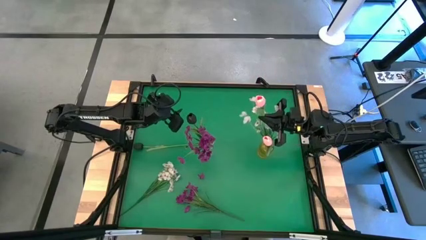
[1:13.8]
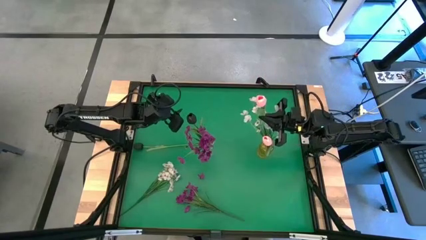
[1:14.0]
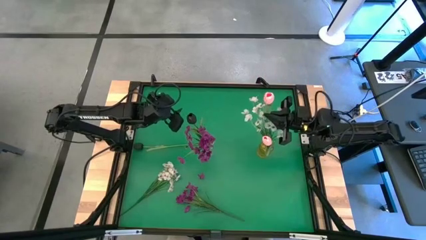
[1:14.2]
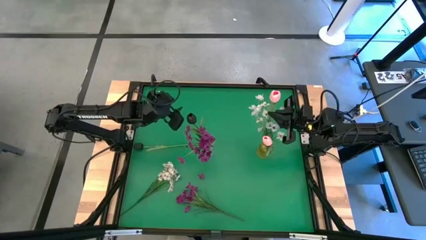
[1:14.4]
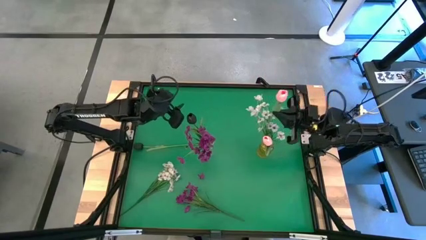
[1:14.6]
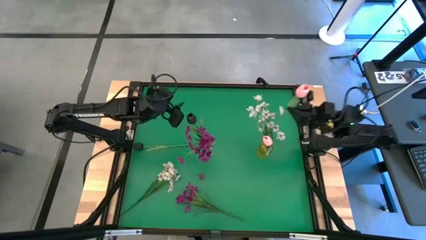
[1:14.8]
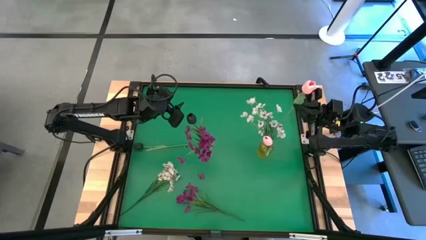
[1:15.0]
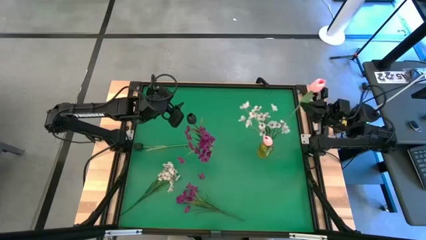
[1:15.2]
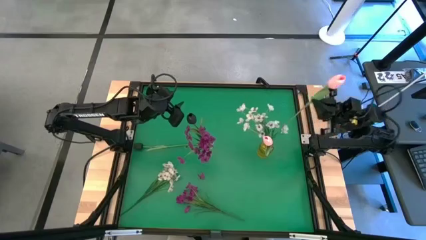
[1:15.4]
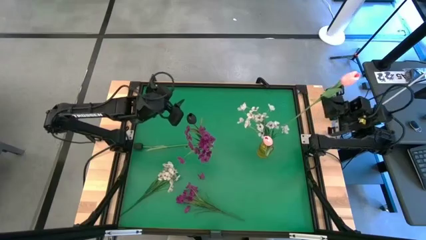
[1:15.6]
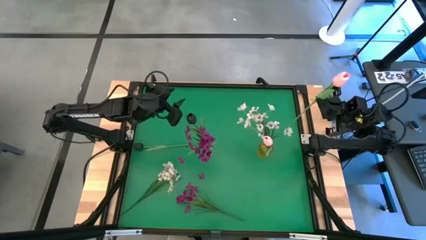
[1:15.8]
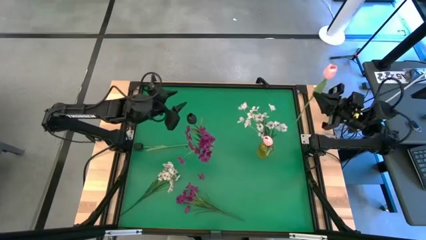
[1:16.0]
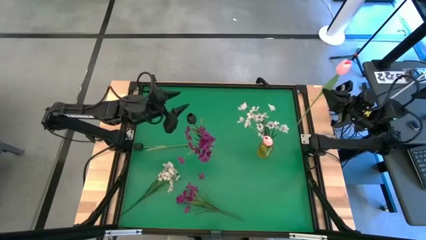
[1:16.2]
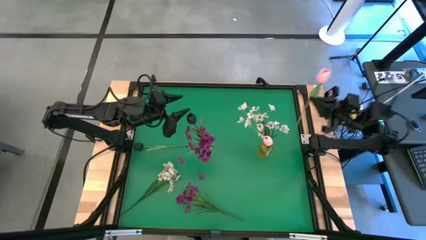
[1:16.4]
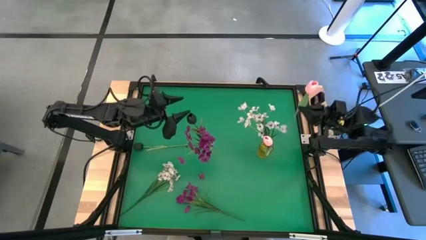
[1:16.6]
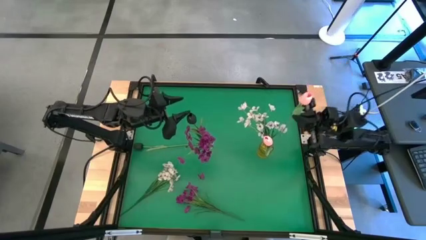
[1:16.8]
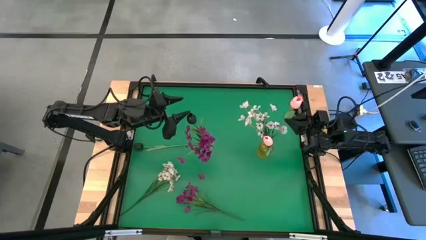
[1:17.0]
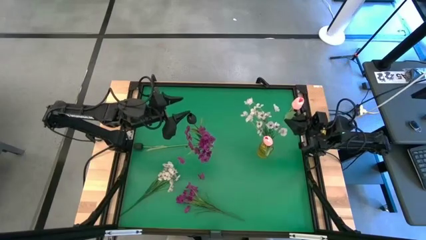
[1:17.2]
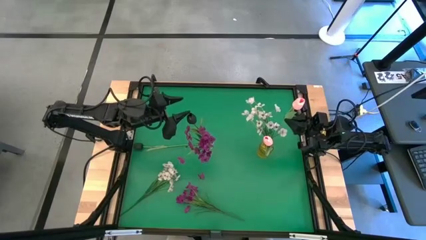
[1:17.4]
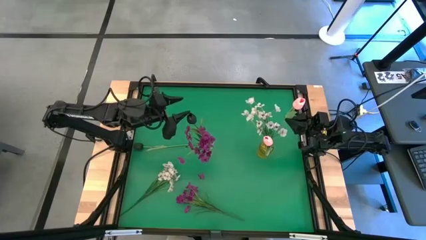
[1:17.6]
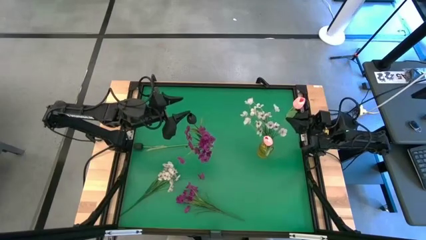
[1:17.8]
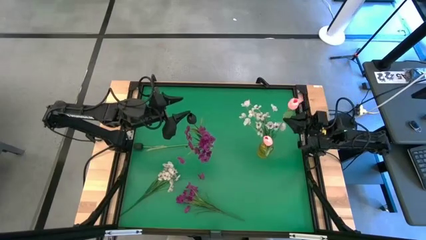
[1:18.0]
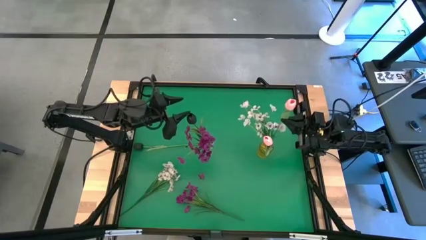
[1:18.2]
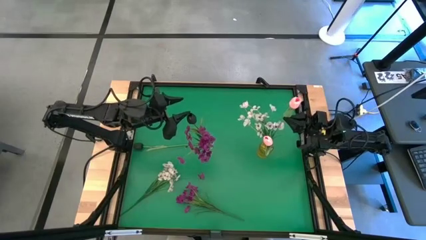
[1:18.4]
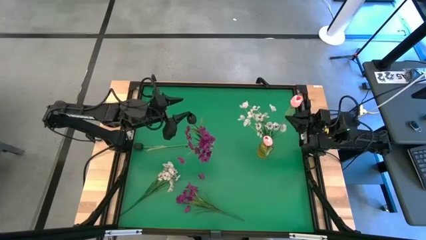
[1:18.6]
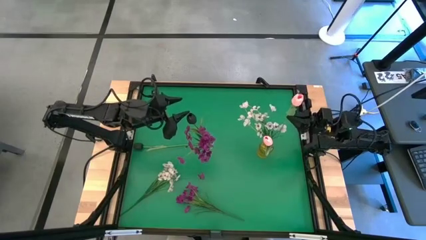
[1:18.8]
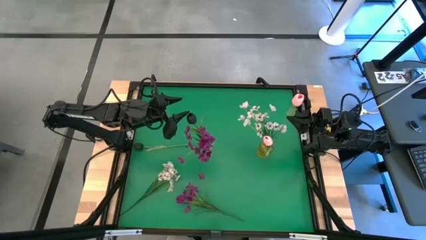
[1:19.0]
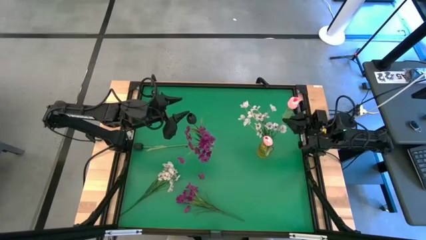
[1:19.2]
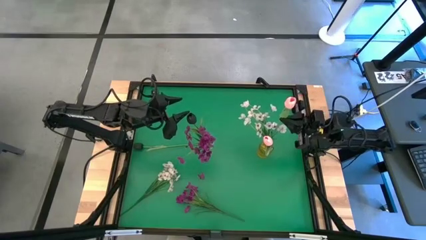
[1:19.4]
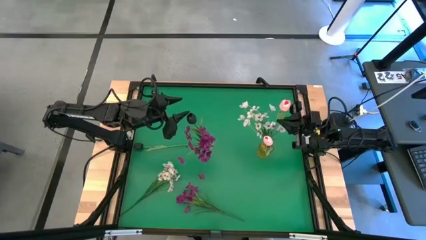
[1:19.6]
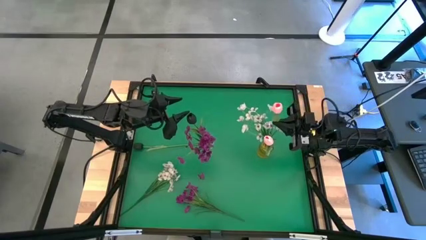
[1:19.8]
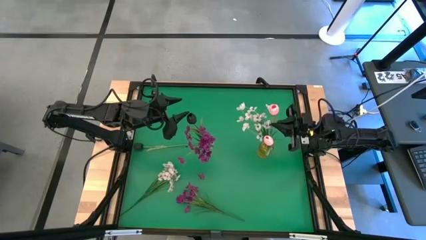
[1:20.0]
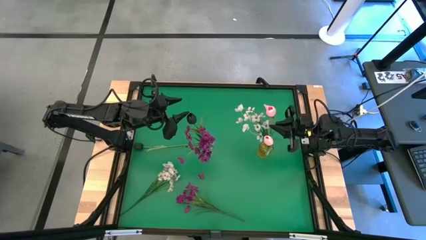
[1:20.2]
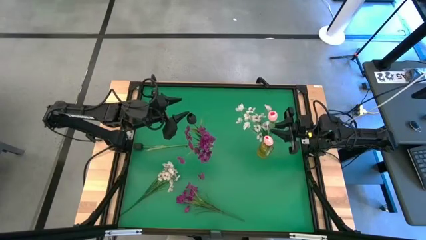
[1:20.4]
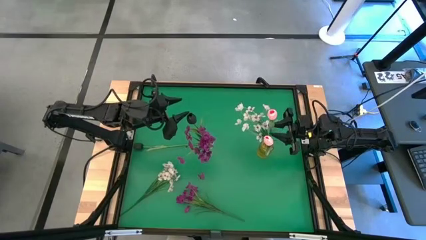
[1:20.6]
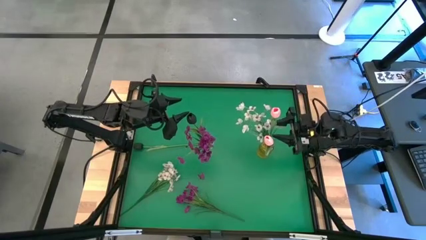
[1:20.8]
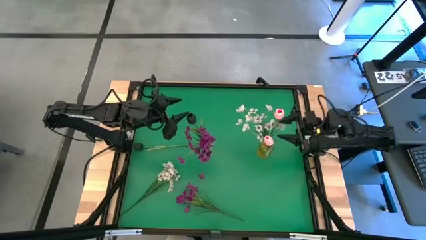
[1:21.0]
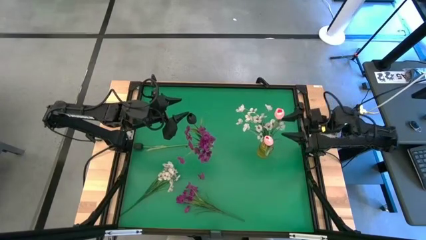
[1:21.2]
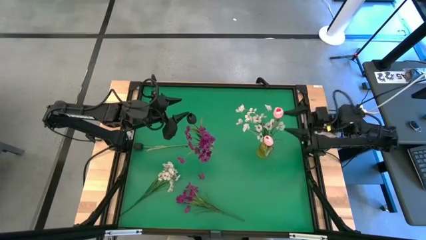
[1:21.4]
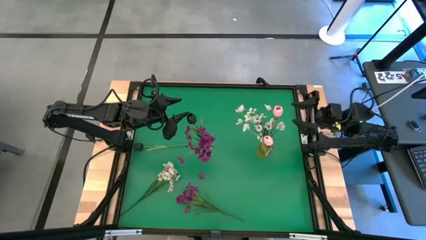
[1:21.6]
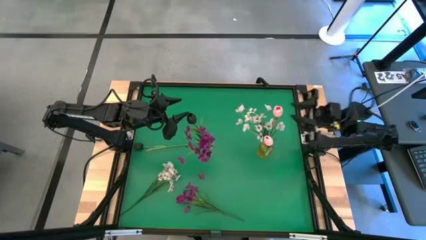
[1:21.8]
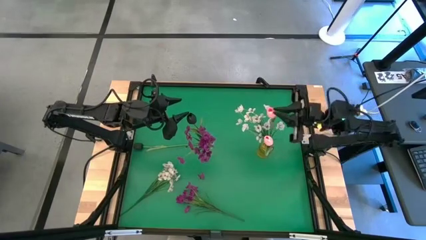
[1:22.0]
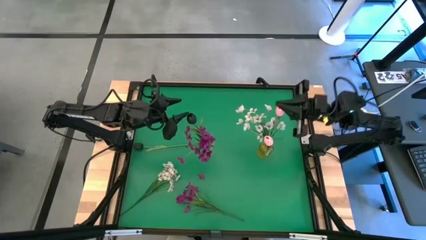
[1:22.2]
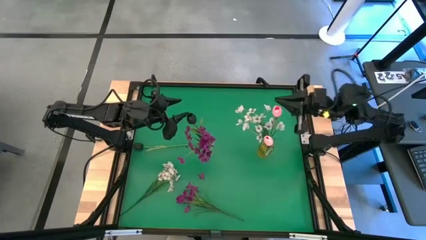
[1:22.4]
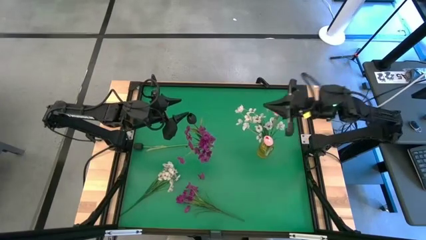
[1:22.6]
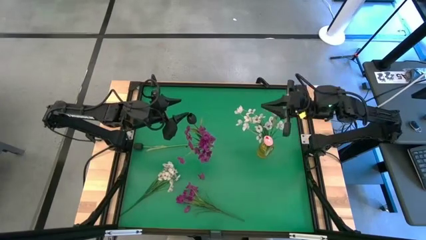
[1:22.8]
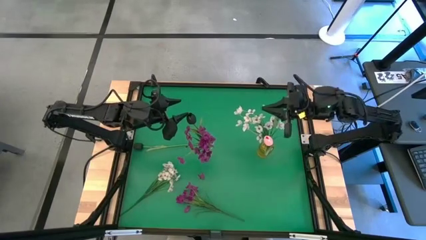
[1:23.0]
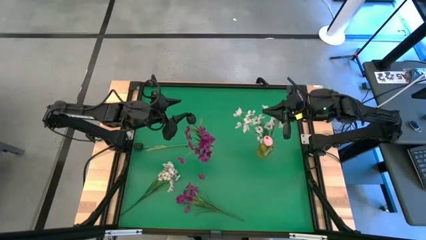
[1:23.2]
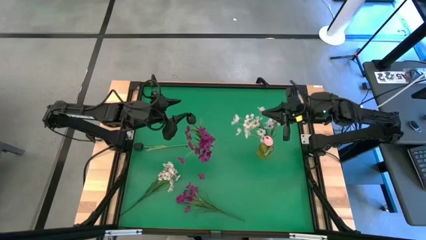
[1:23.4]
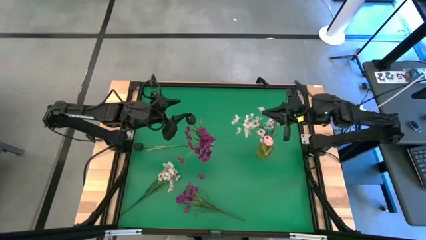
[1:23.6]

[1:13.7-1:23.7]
Task: Sort flowers into vase by color
Put the pink tulip into the yellow vase

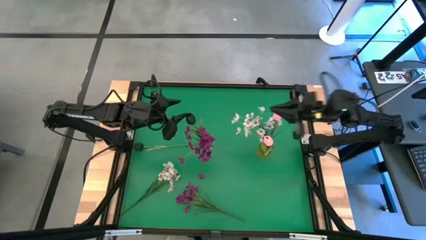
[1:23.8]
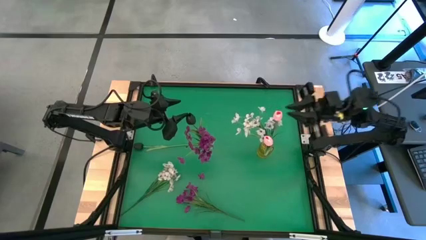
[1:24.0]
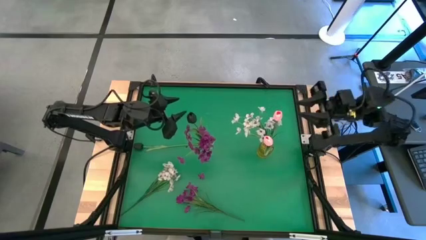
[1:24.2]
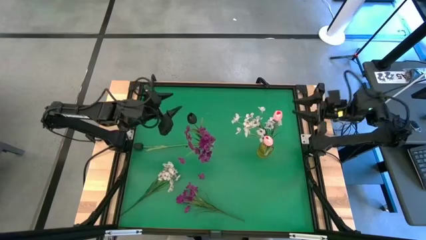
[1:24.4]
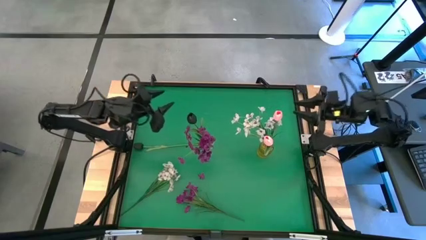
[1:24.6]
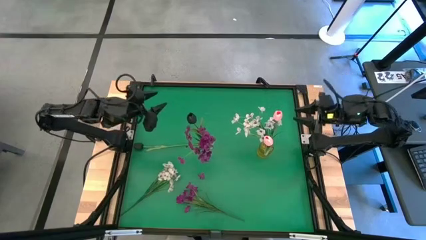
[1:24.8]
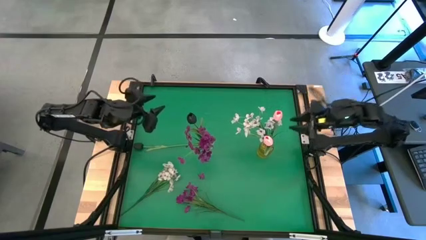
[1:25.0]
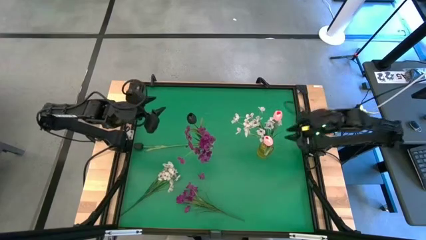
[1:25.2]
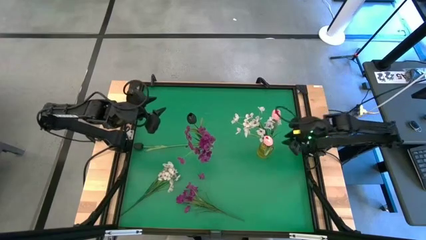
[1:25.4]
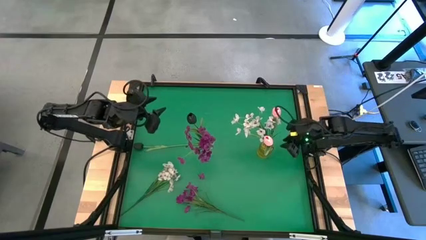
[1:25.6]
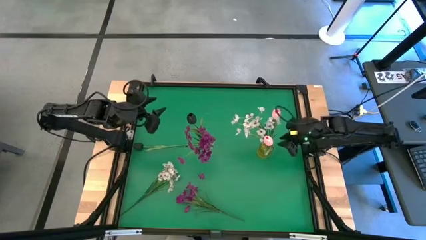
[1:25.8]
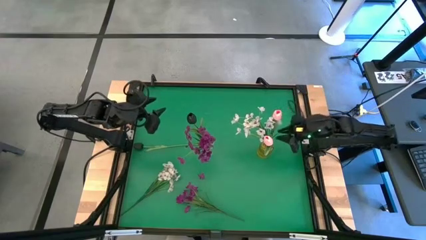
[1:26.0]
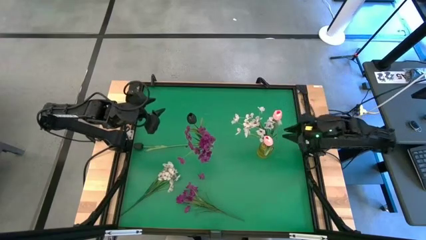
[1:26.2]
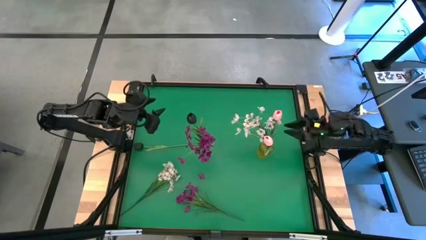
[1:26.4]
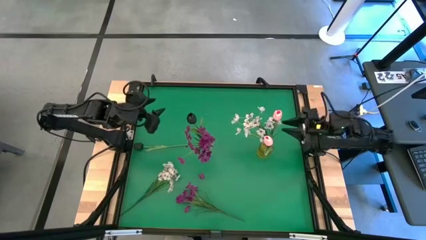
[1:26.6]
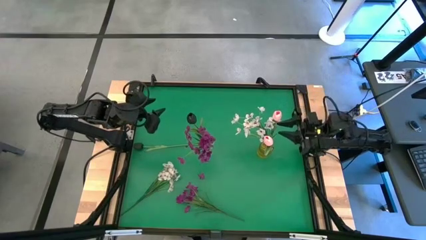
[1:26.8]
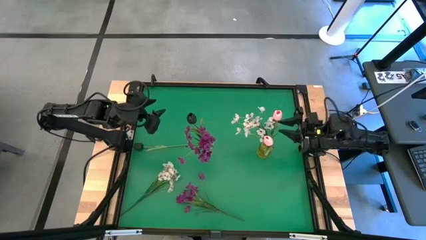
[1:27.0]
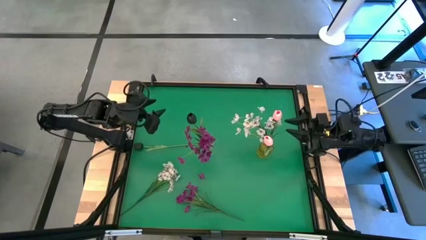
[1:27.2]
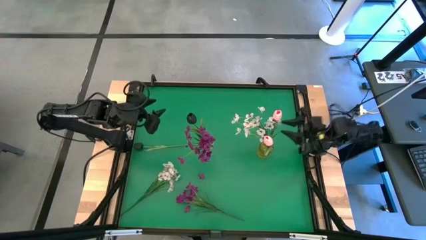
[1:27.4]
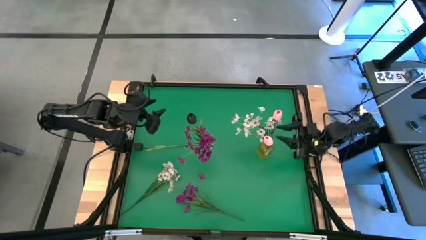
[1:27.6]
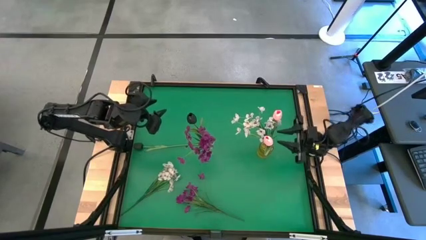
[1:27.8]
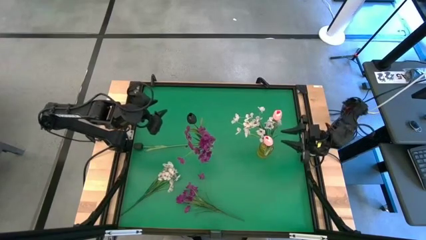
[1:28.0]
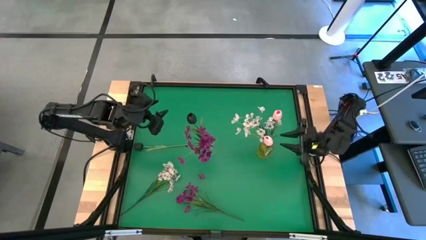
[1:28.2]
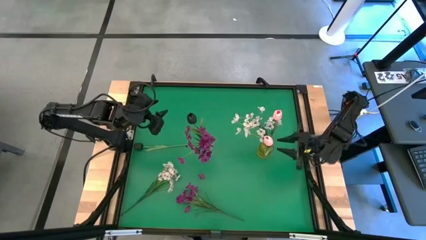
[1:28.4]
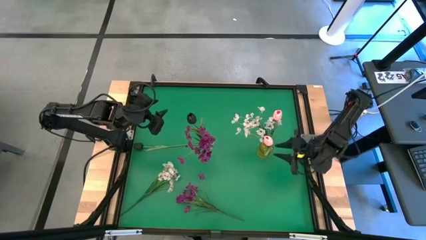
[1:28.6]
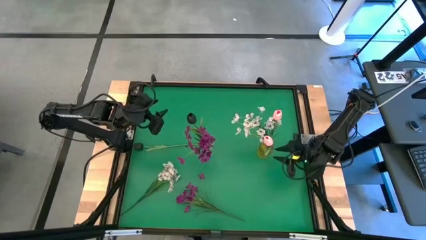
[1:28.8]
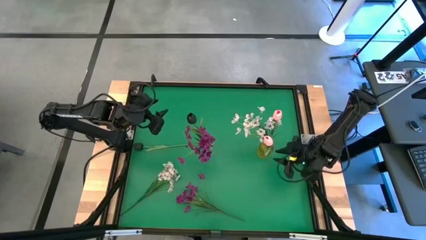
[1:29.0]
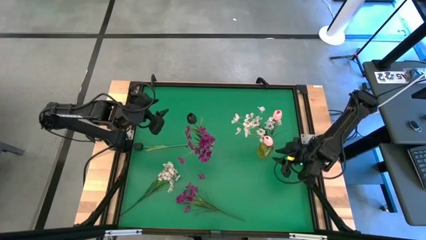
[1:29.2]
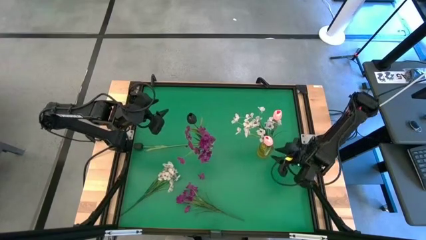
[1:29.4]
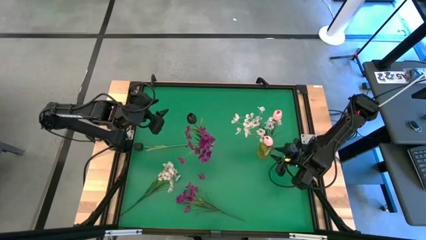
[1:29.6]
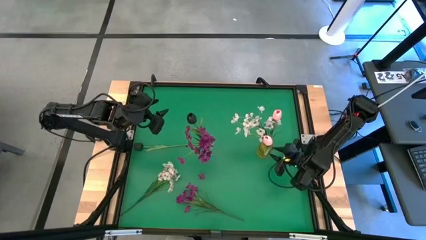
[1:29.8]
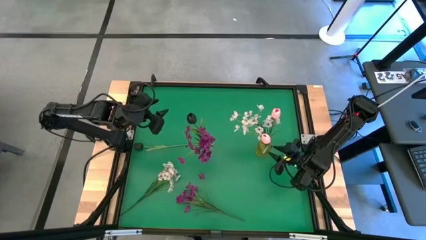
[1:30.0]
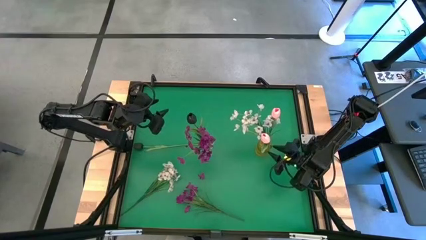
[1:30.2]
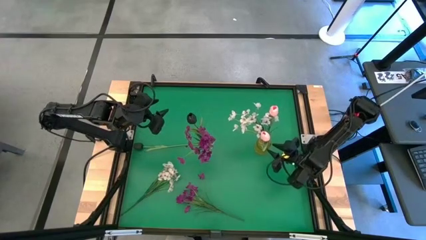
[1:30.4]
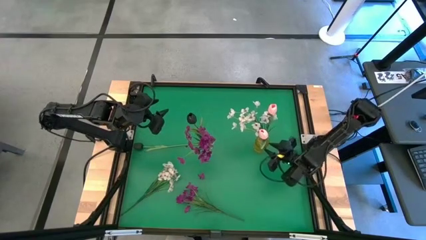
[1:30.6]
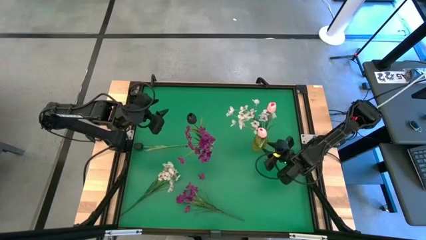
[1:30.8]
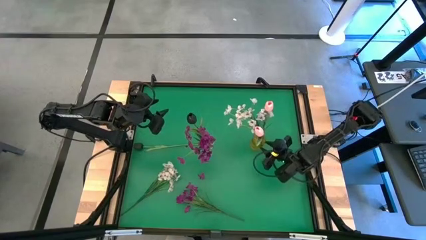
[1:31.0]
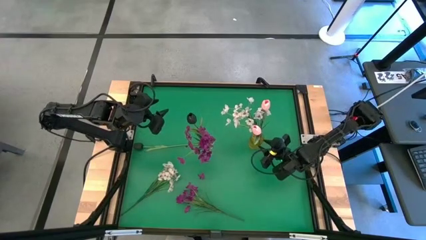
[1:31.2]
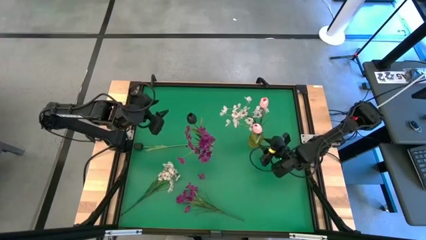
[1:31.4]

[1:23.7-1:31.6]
Adjust the yellow vase
